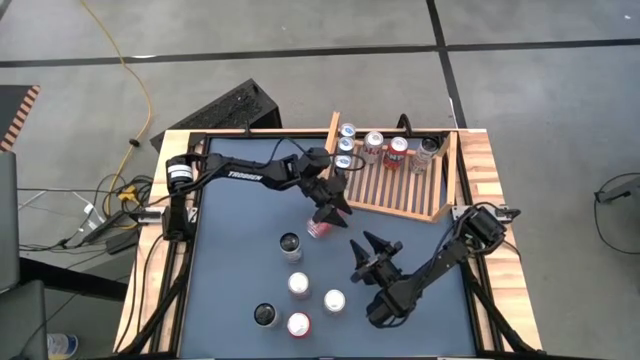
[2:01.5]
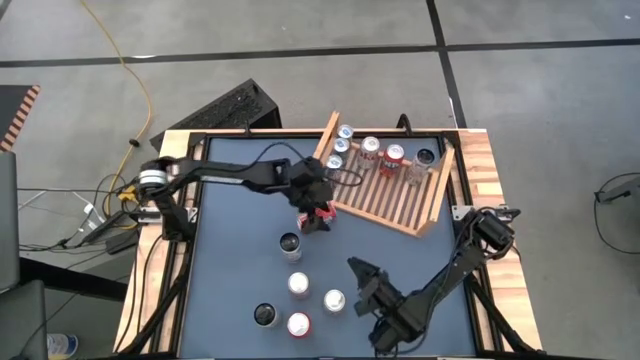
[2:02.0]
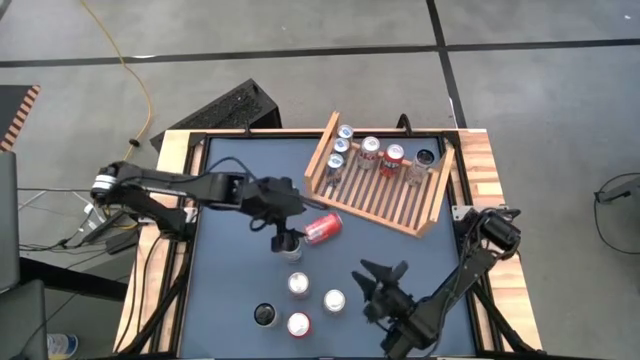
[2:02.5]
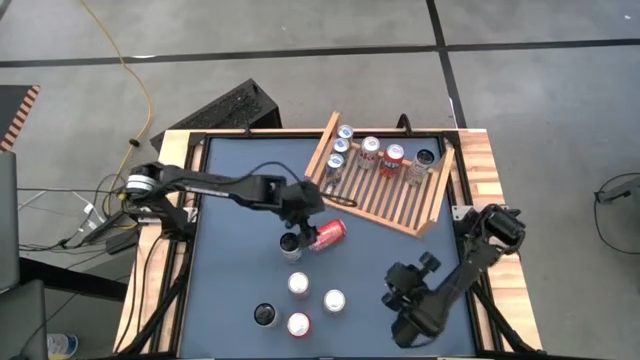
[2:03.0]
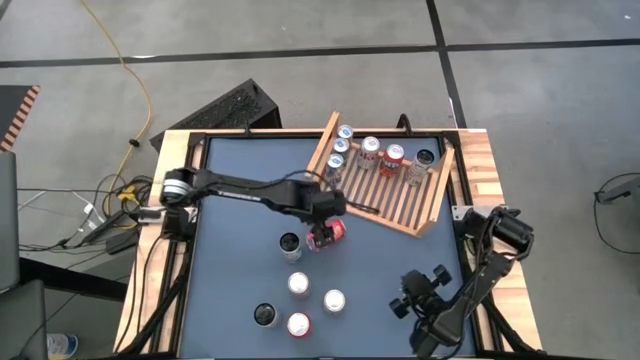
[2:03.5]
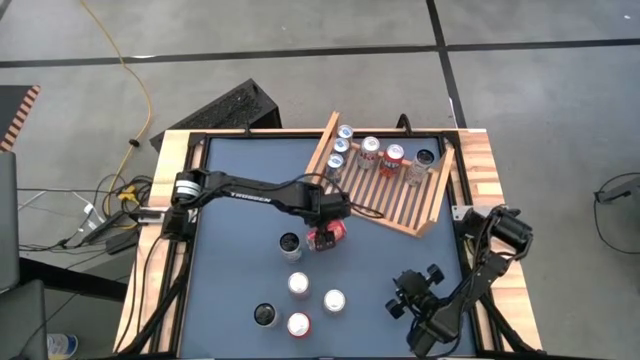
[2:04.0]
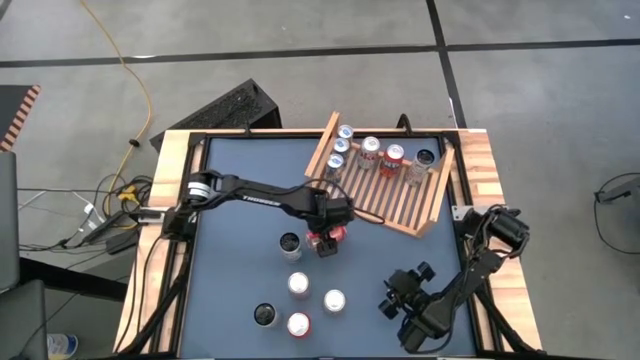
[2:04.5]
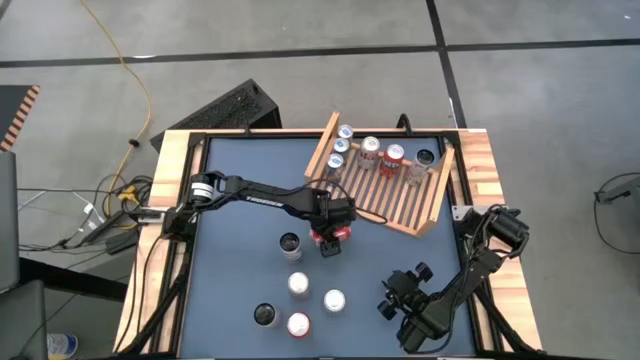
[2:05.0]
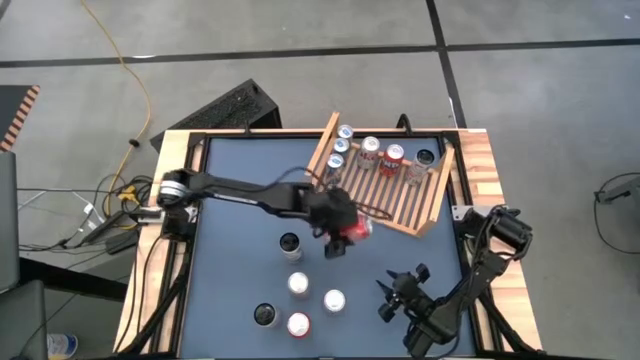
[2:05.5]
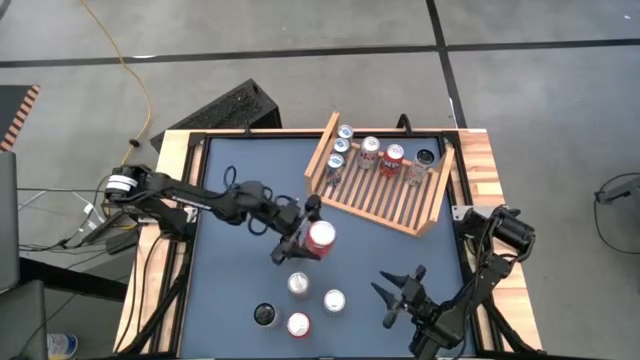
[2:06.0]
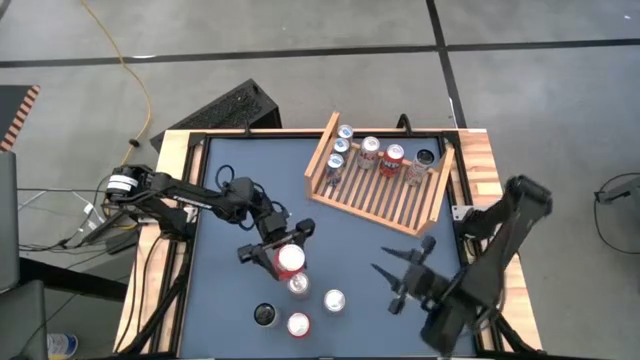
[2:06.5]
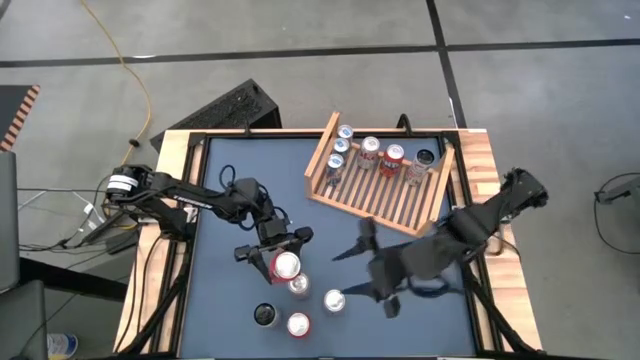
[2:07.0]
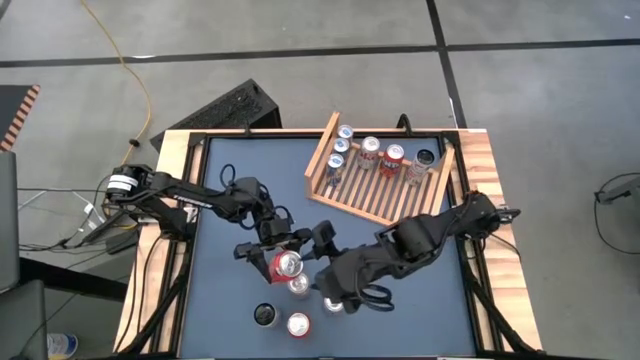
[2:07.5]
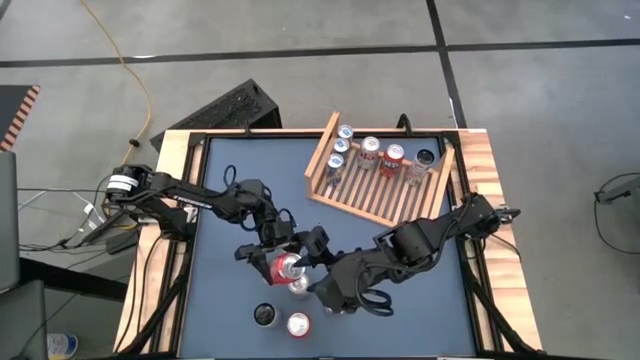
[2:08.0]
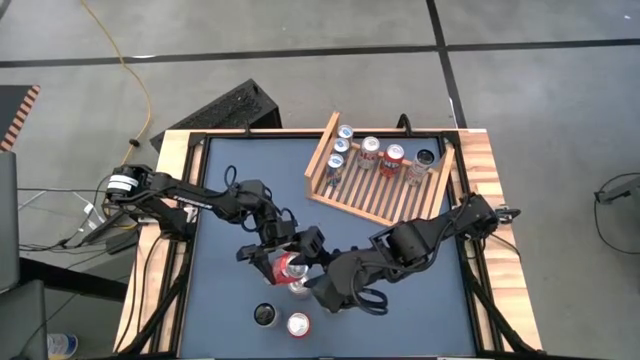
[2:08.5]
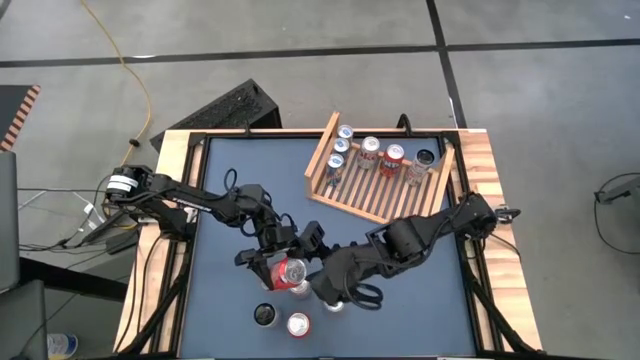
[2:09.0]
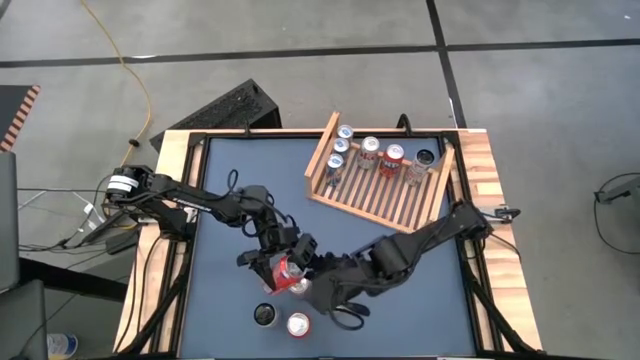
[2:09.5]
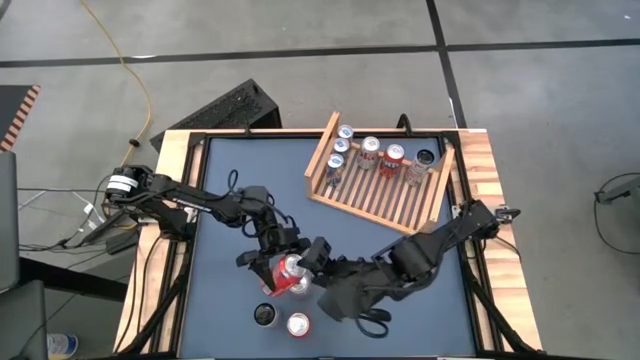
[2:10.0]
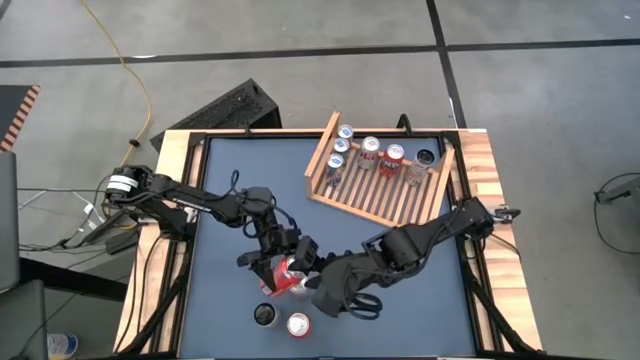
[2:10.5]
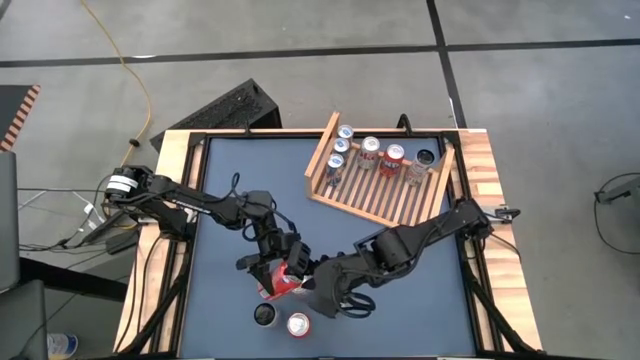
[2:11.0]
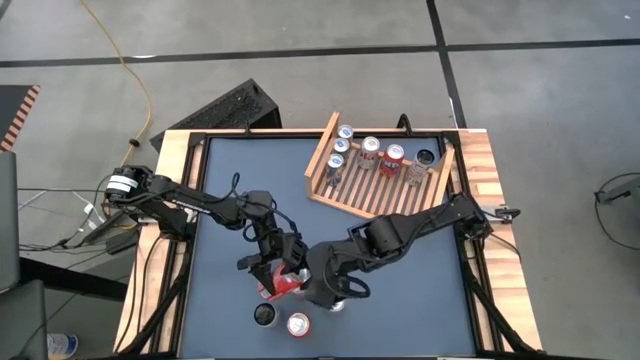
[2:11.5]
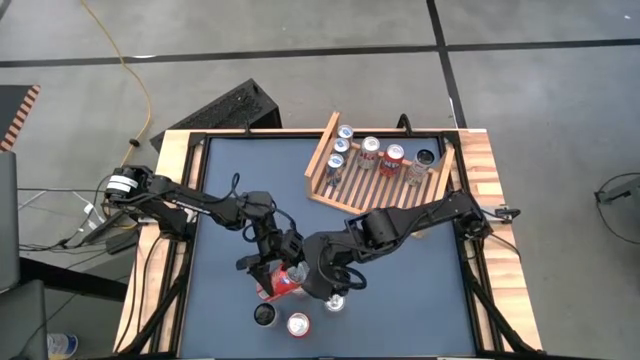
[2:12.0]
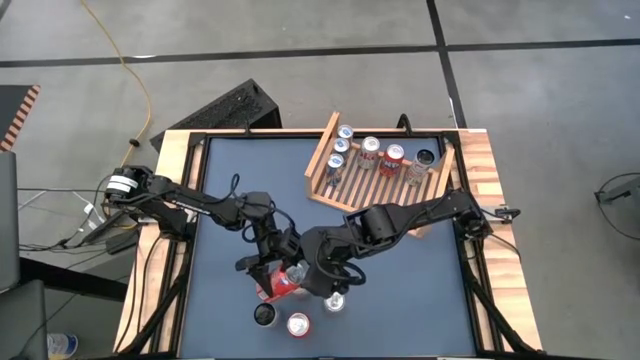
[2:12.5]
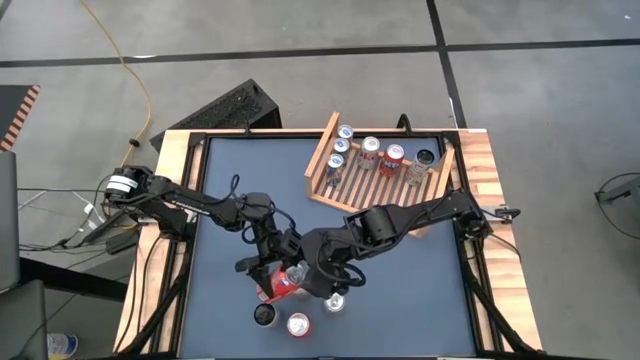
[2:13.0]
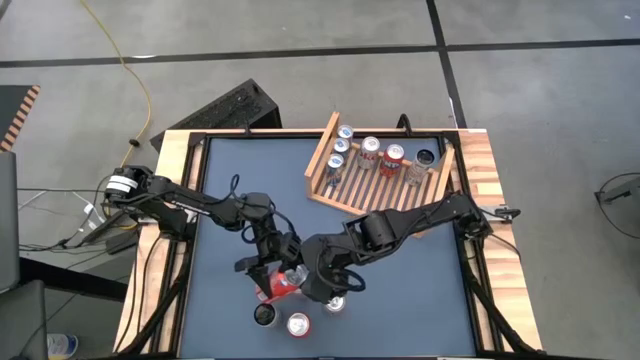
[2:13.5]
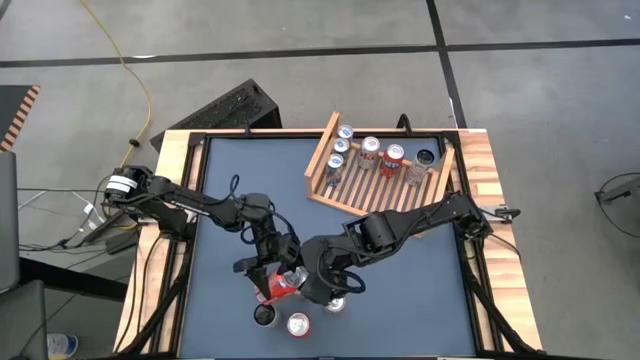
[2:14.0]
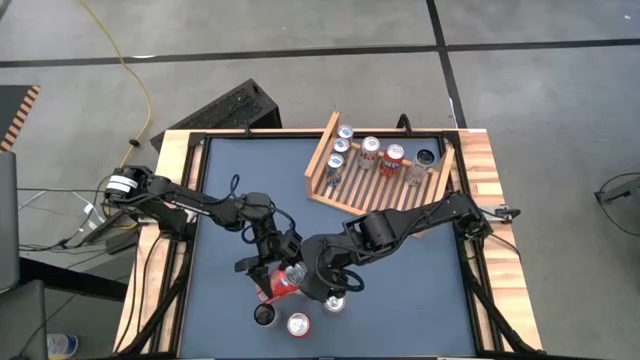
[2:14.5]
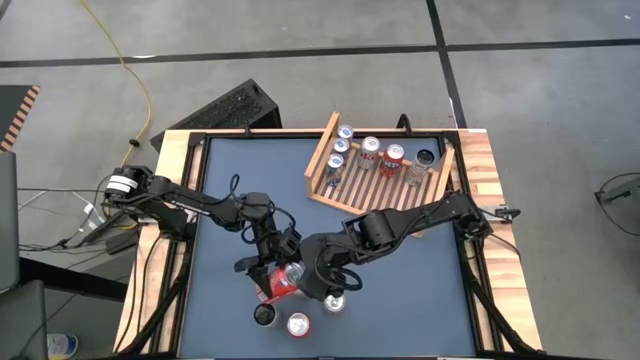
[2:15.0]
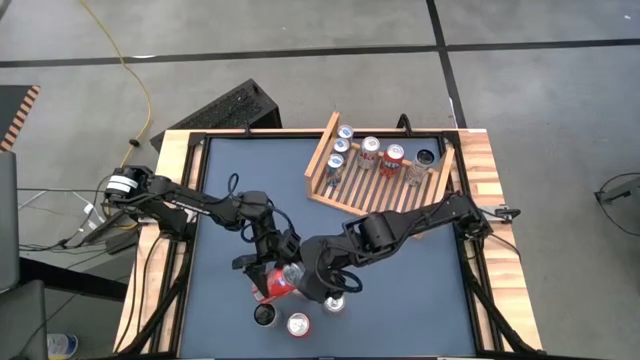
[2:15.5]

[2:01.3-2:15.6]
Task: Place canned beverage on shelf
Put the top red soda can aligned with the other red soda can on the shelf
